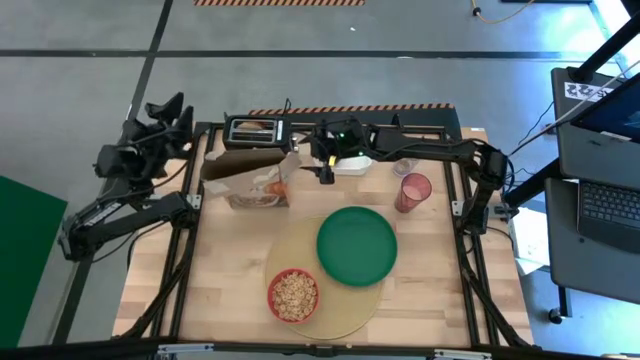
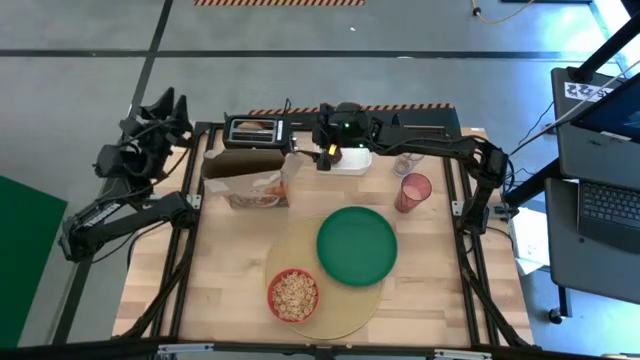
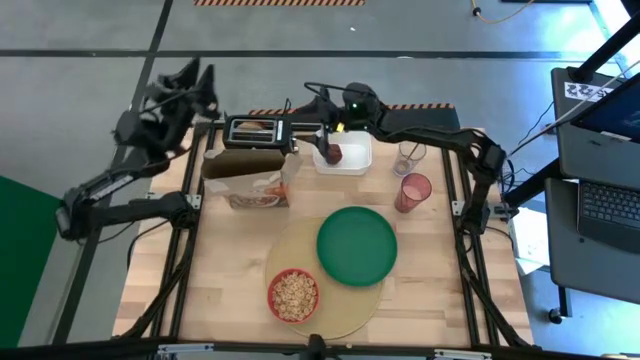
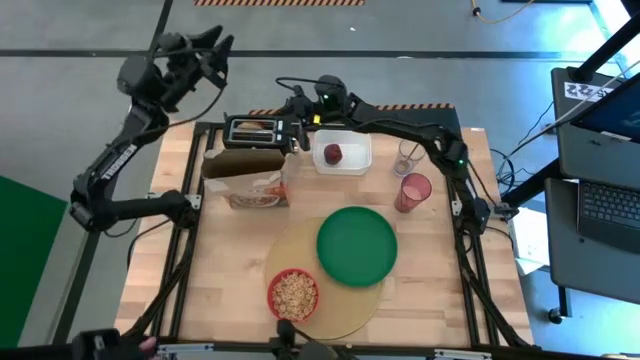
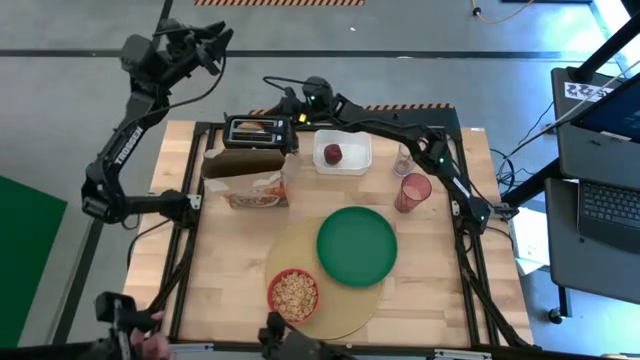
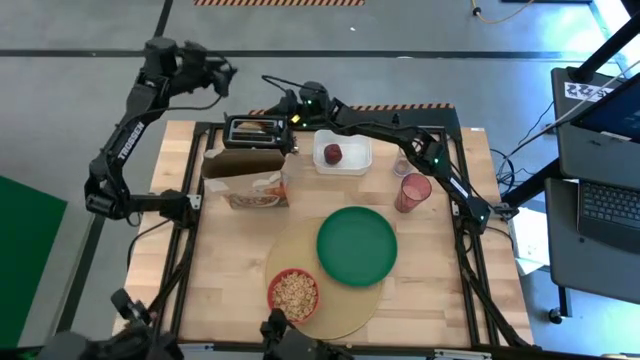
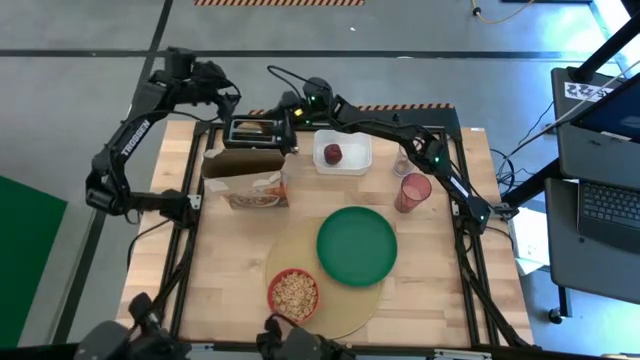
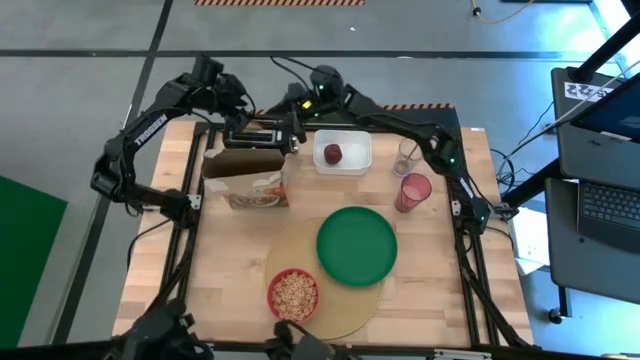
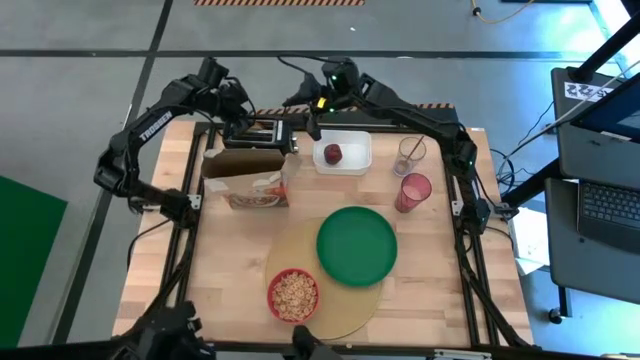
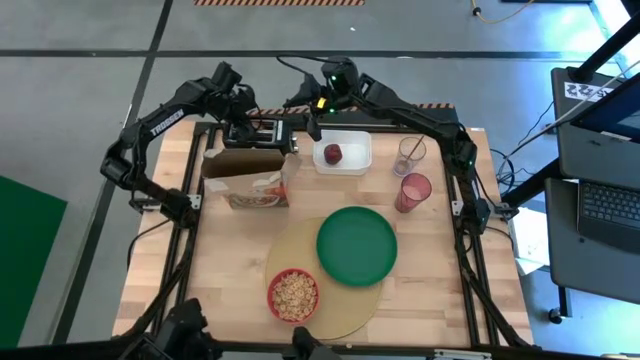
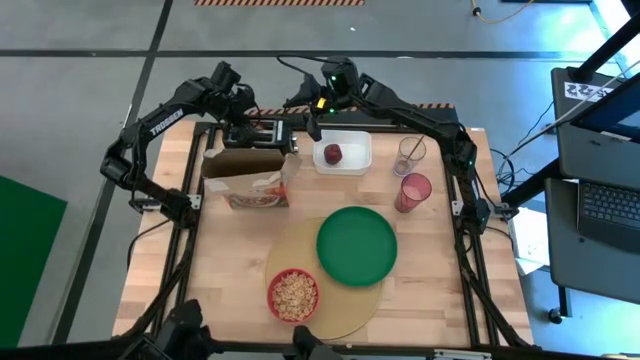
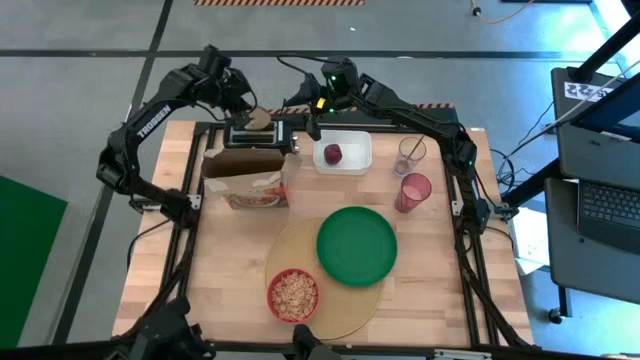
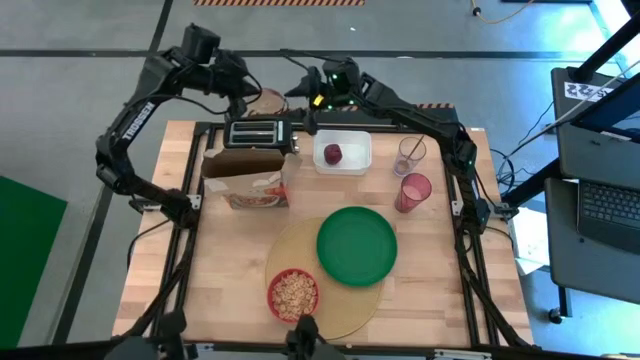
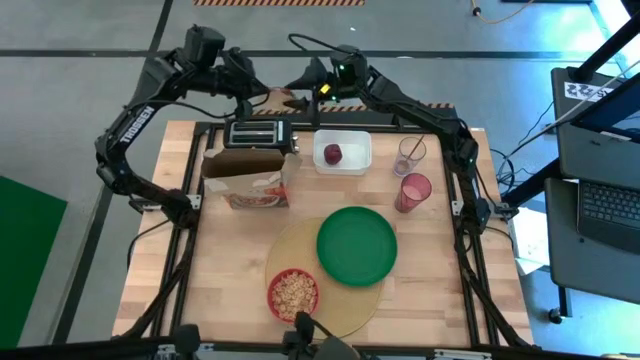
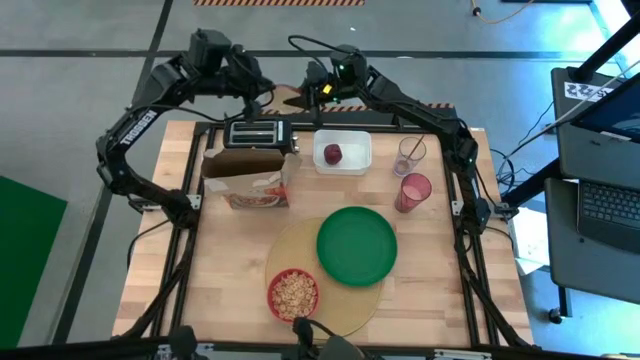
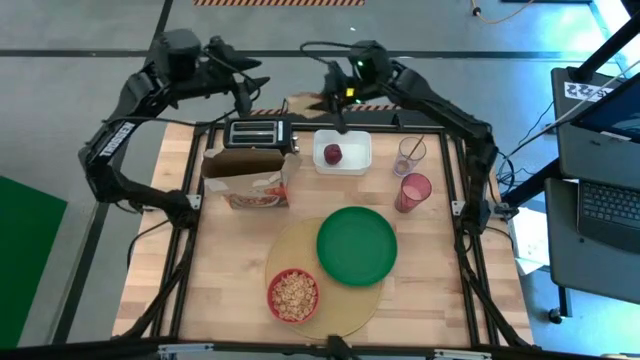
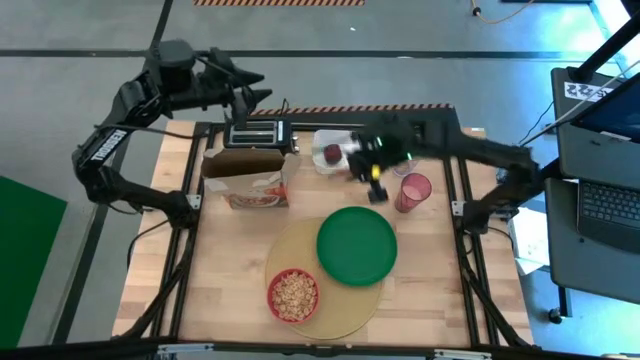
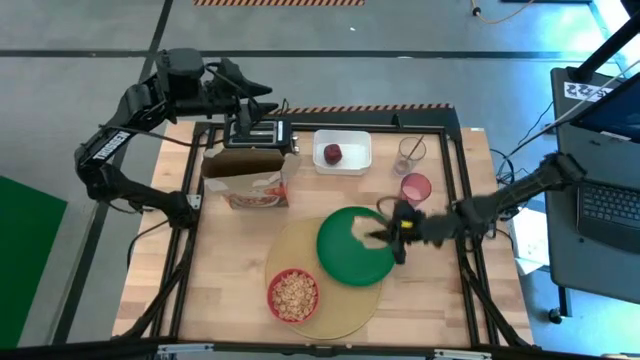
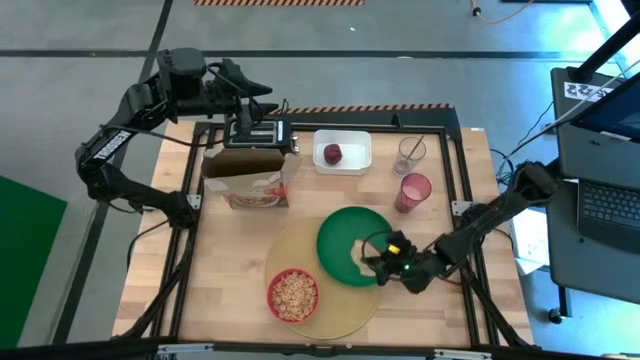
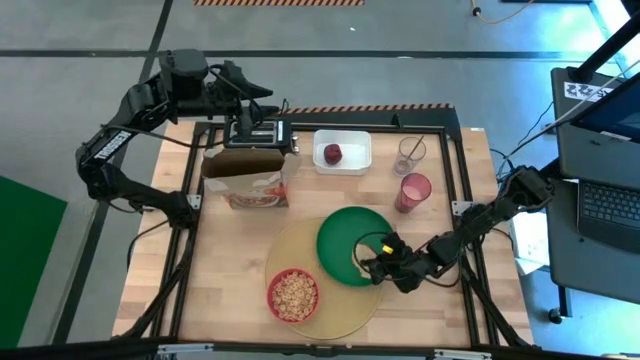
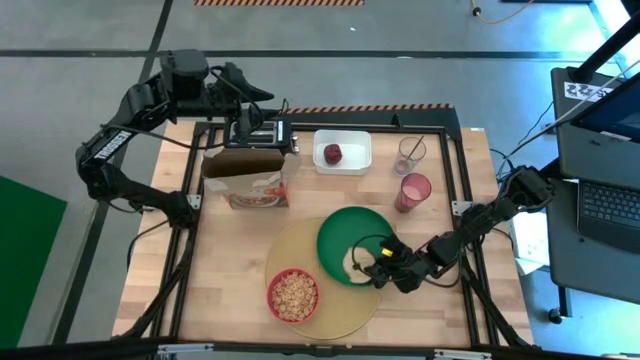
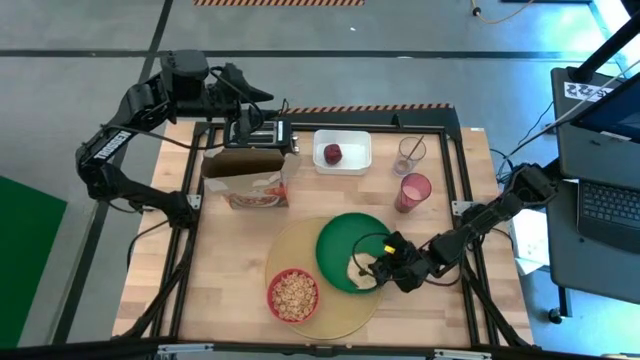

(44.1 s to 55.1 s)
Task: Arrange a breakfast setting
Put the bagel on the green plate

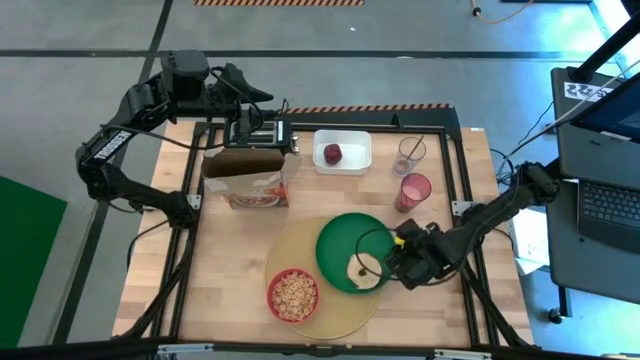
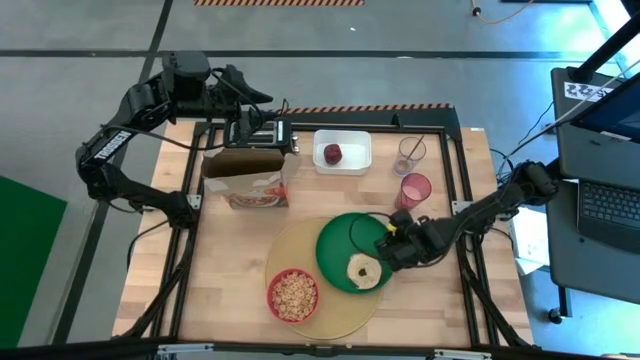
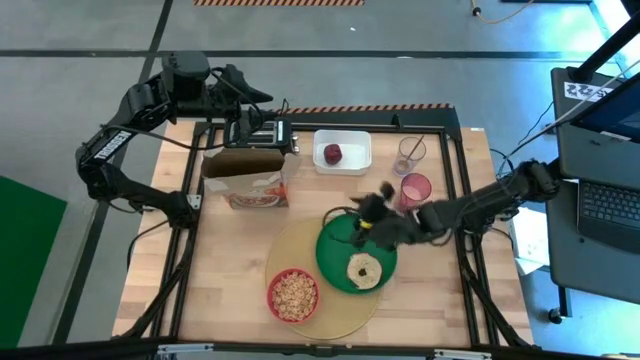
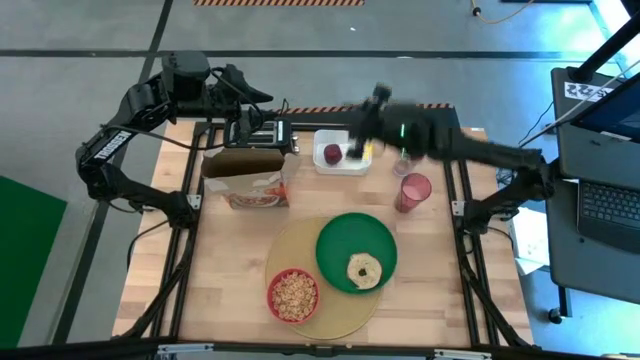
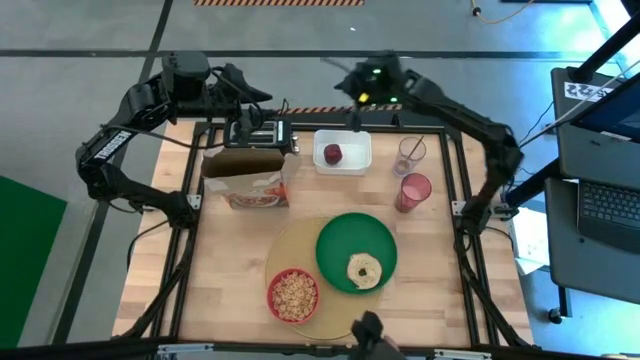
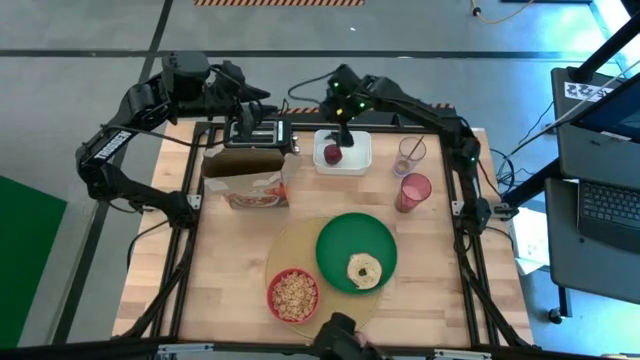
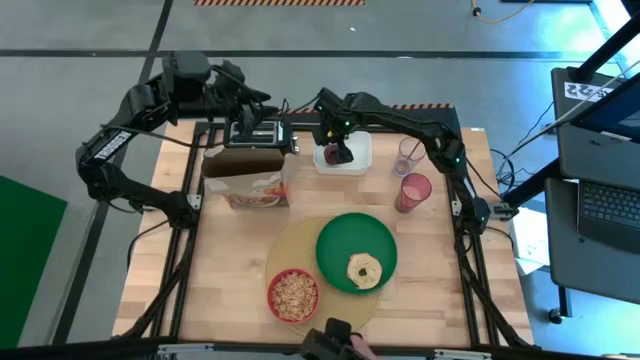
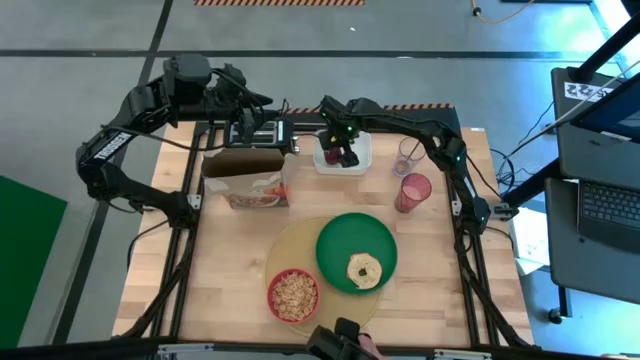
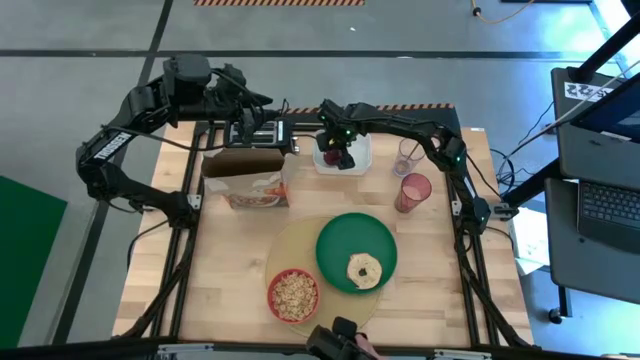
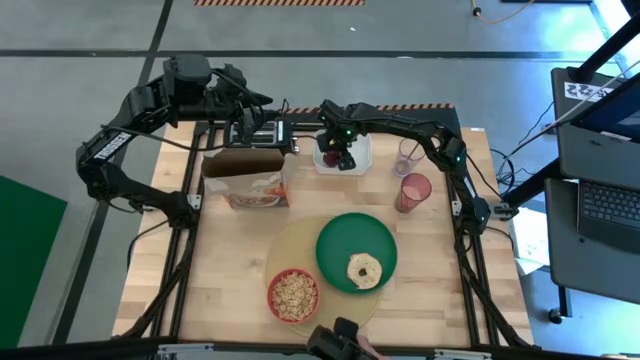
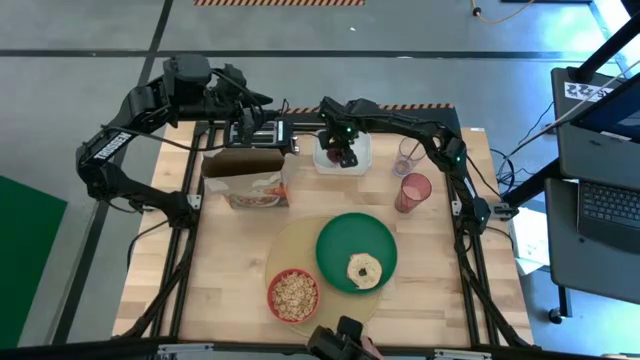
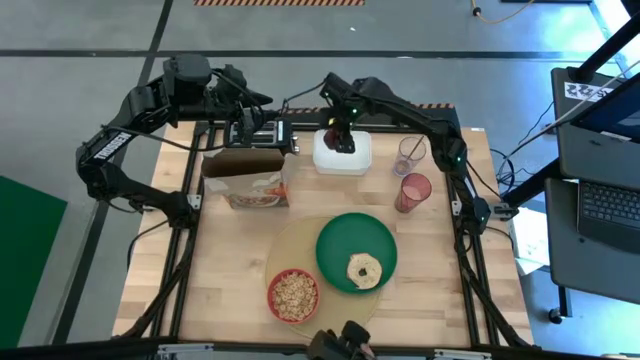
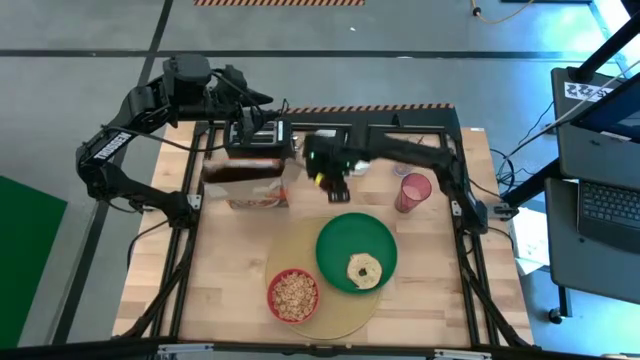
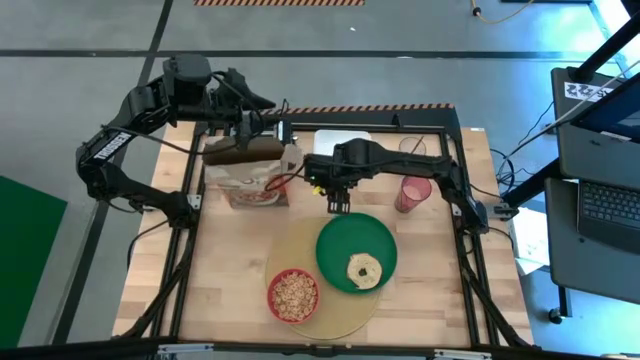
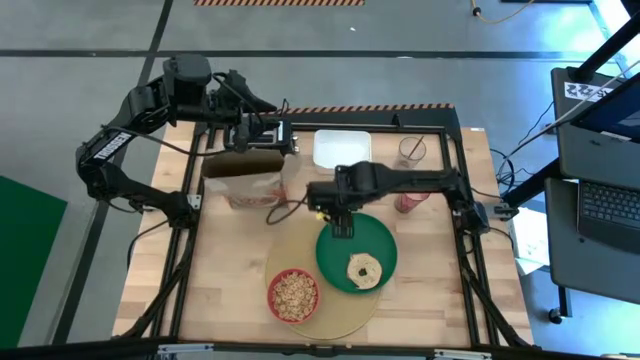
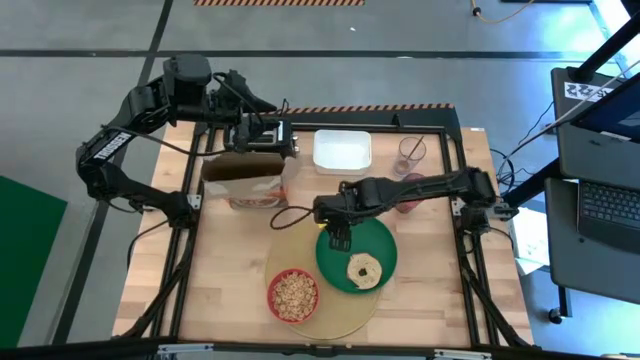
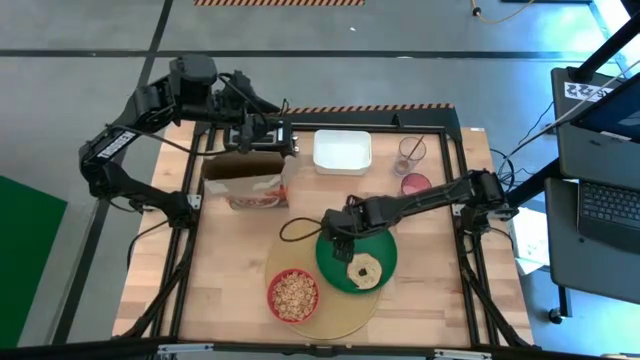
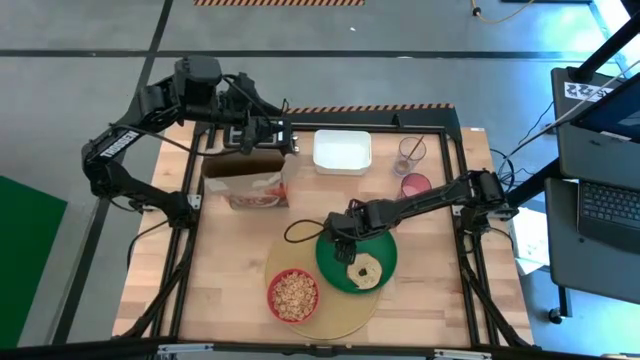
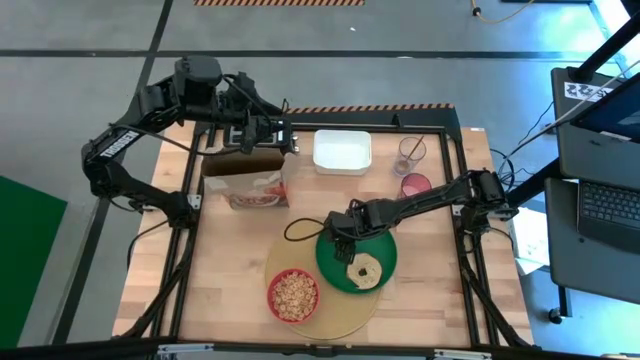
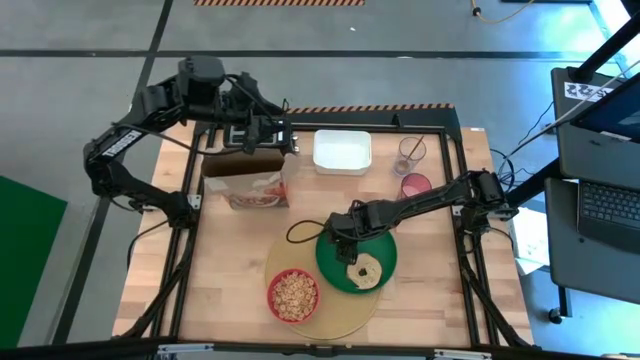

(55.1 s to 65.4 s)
Put the apple on the green plate
